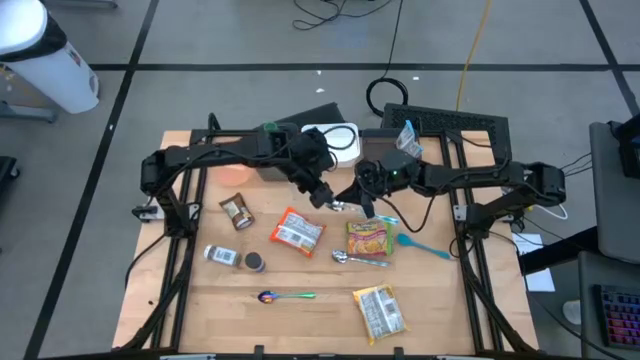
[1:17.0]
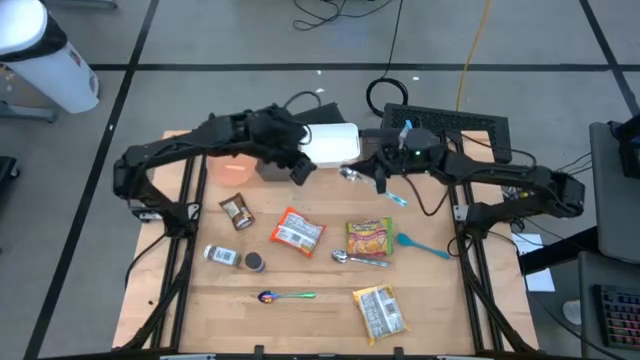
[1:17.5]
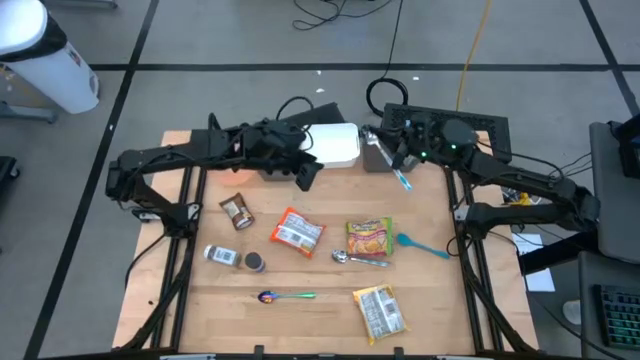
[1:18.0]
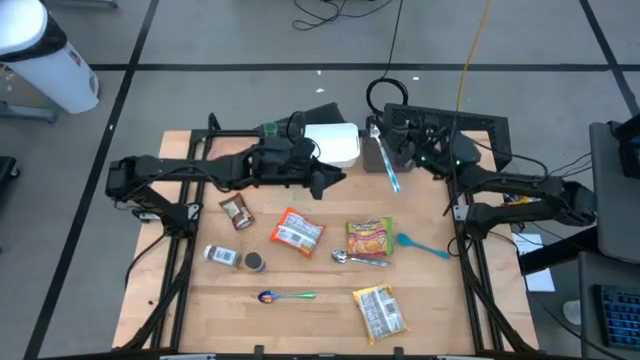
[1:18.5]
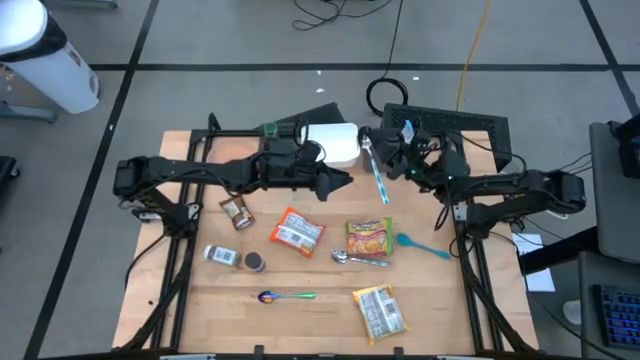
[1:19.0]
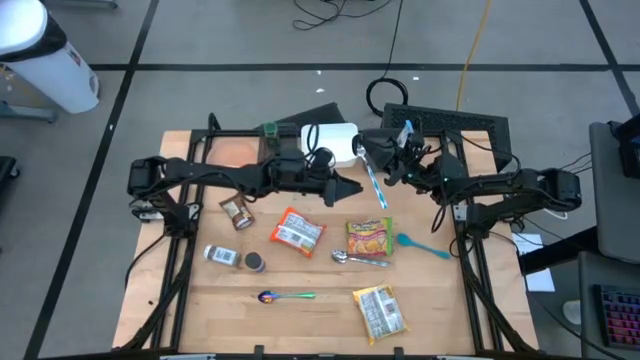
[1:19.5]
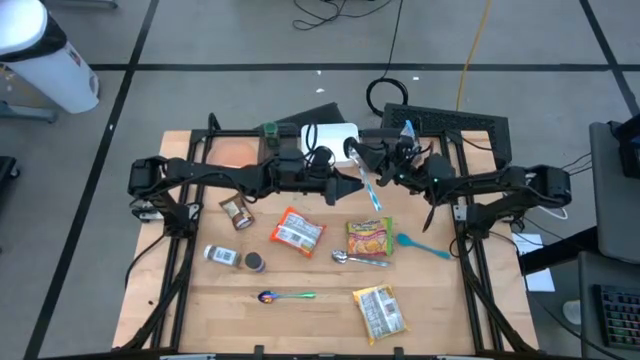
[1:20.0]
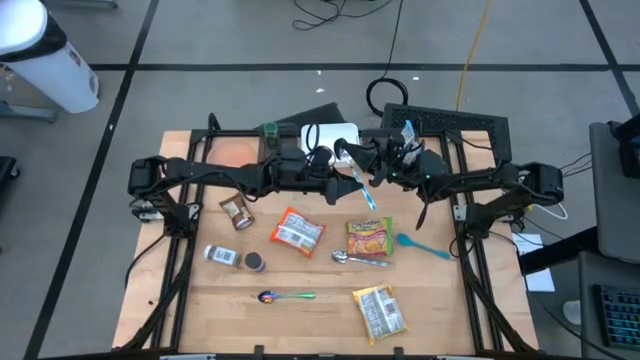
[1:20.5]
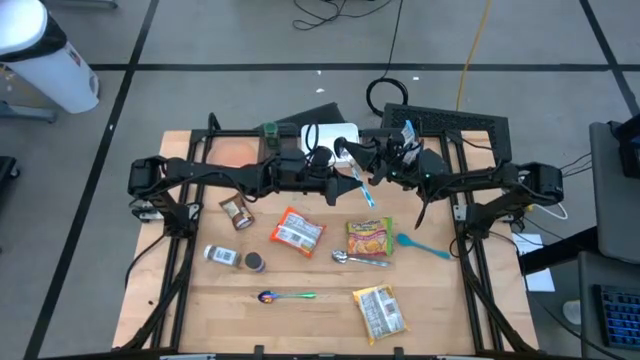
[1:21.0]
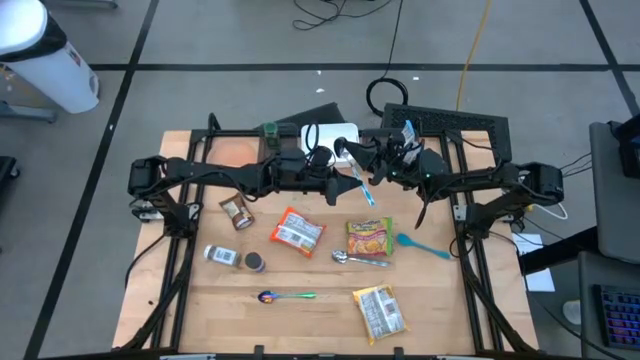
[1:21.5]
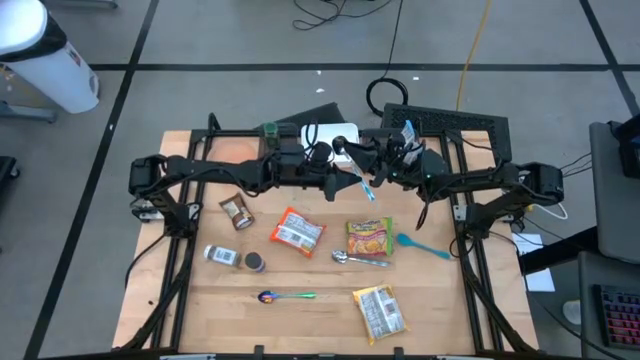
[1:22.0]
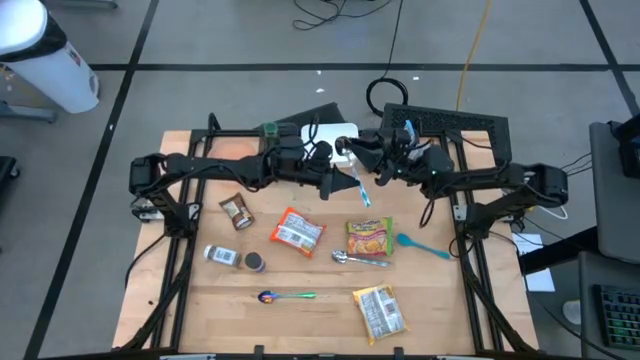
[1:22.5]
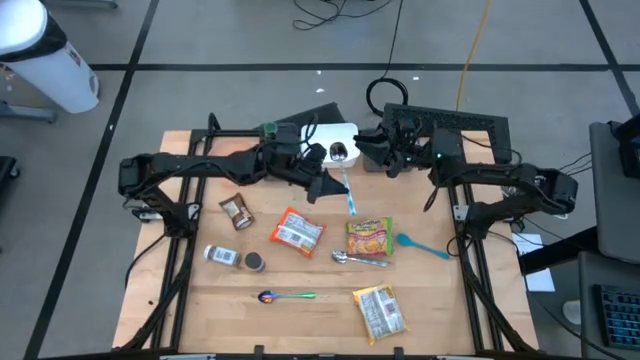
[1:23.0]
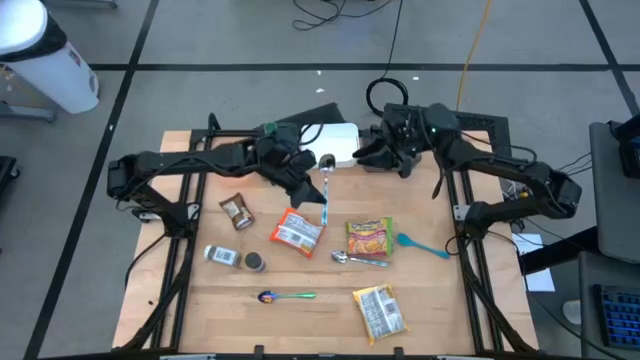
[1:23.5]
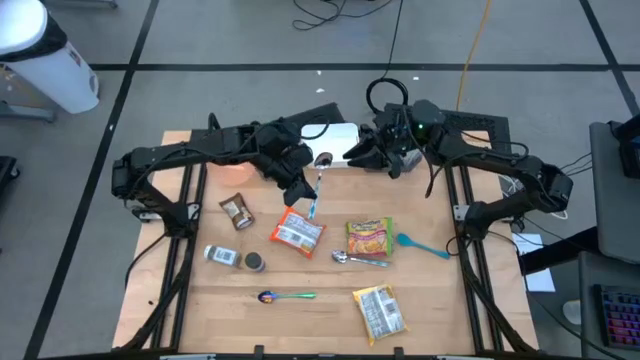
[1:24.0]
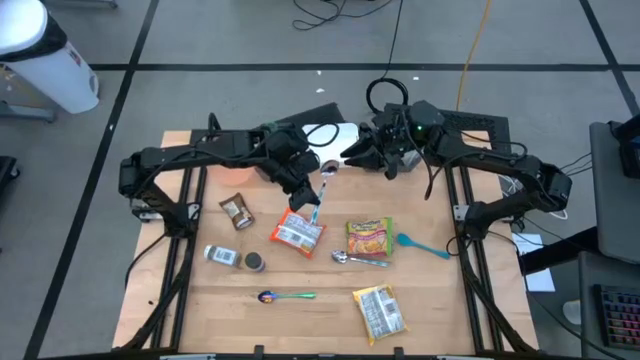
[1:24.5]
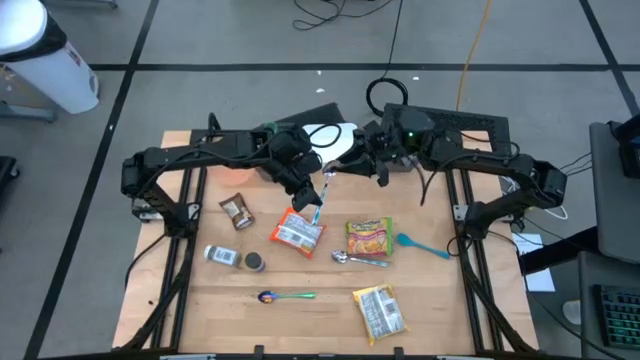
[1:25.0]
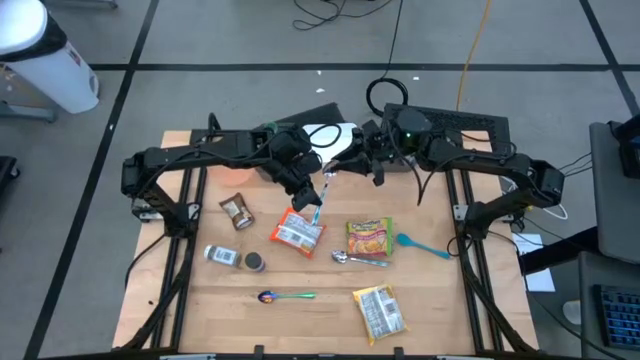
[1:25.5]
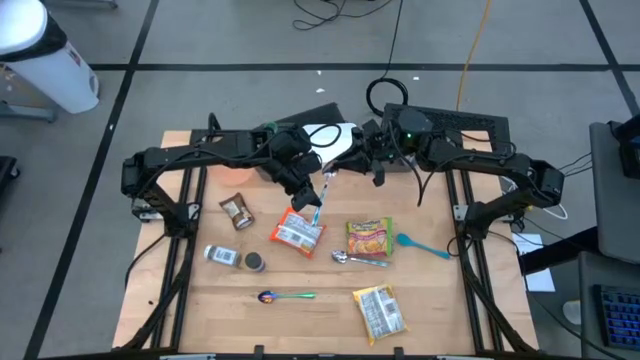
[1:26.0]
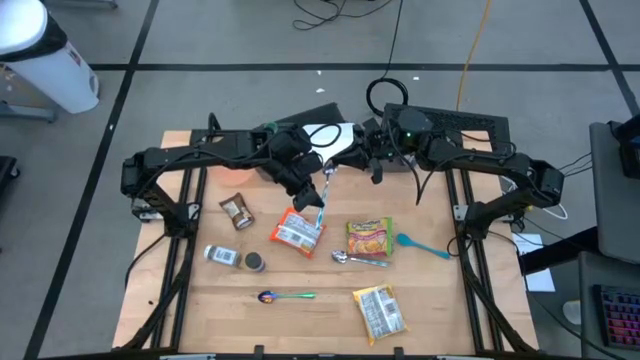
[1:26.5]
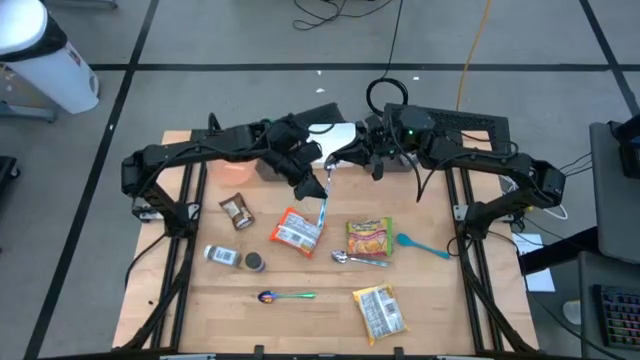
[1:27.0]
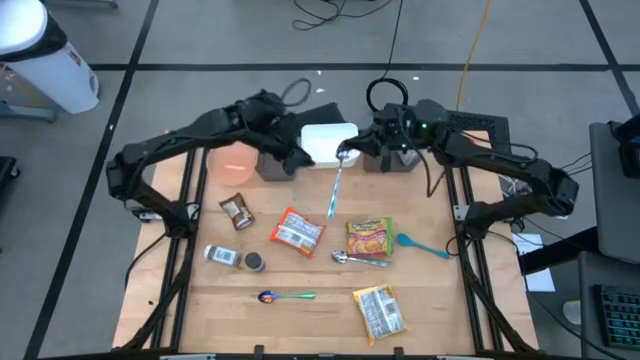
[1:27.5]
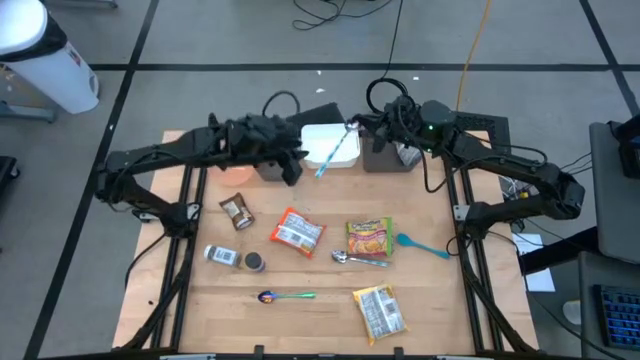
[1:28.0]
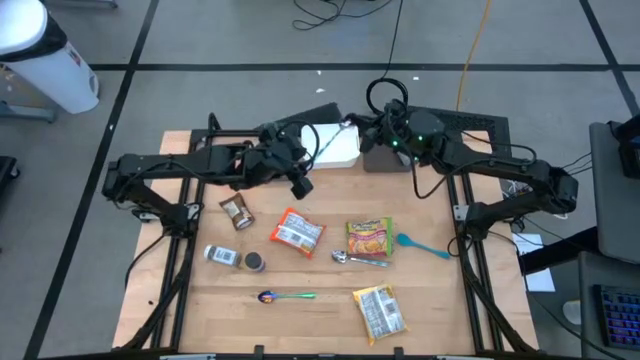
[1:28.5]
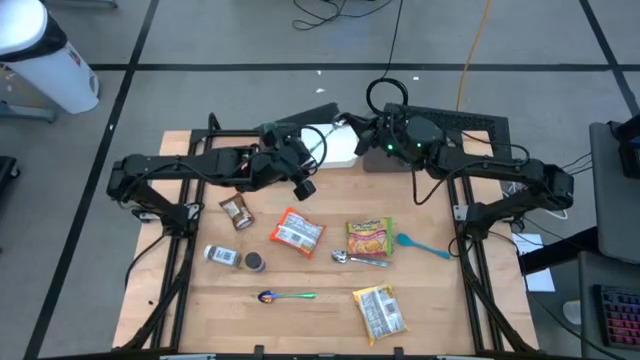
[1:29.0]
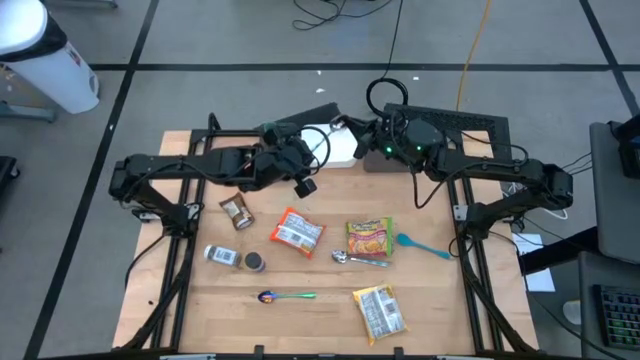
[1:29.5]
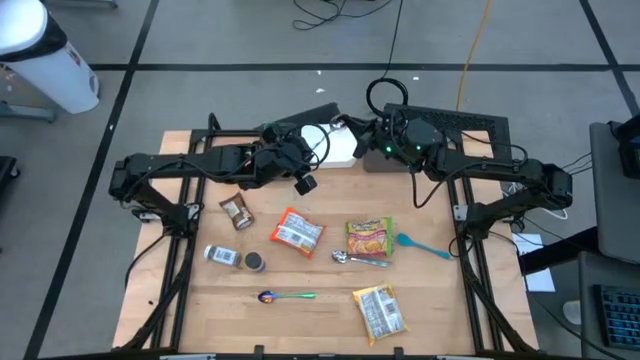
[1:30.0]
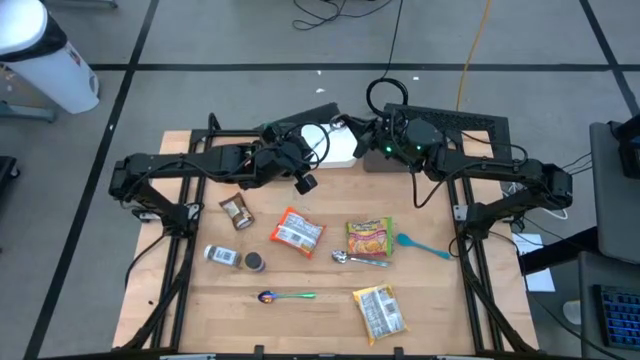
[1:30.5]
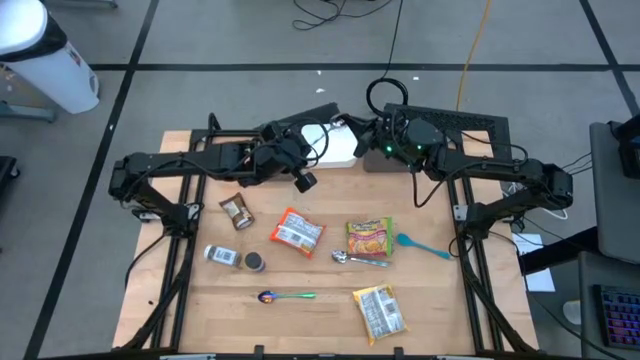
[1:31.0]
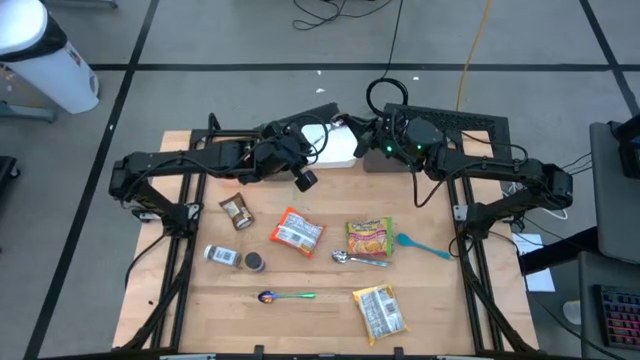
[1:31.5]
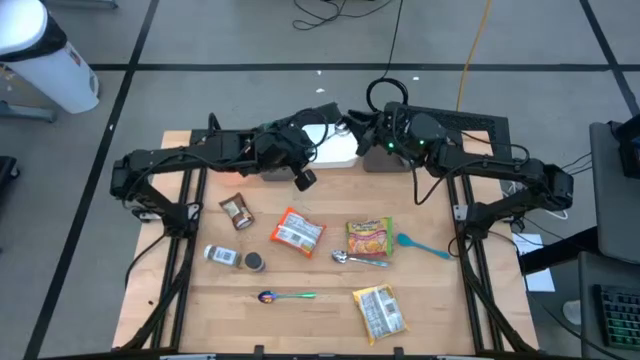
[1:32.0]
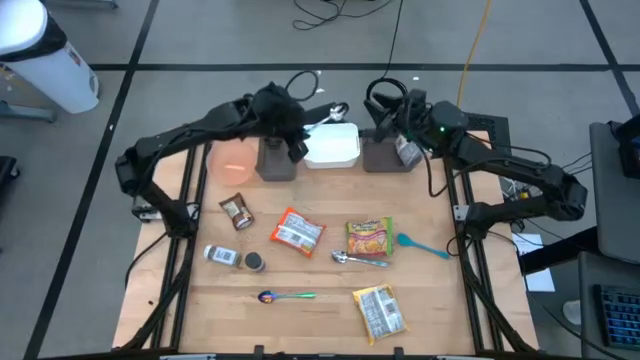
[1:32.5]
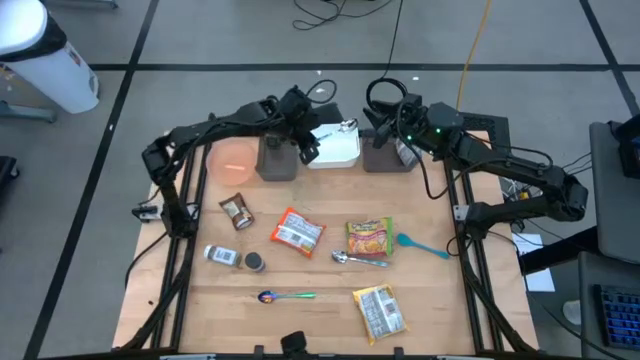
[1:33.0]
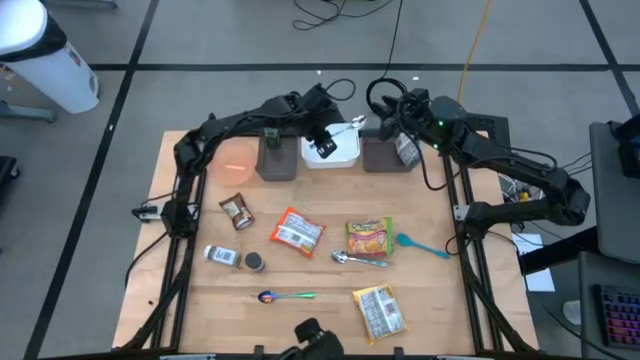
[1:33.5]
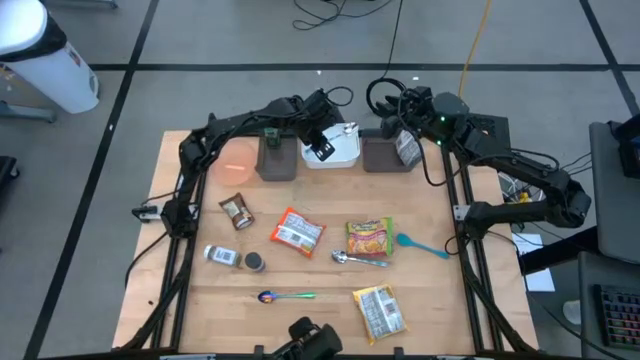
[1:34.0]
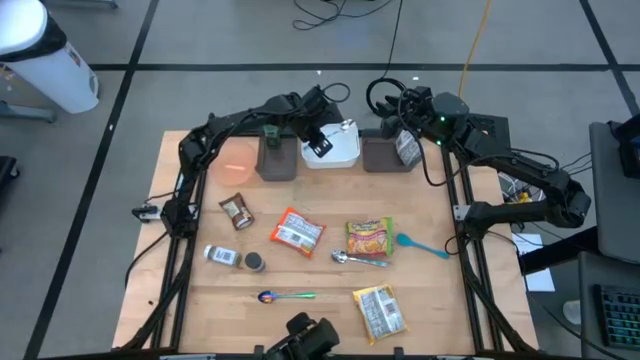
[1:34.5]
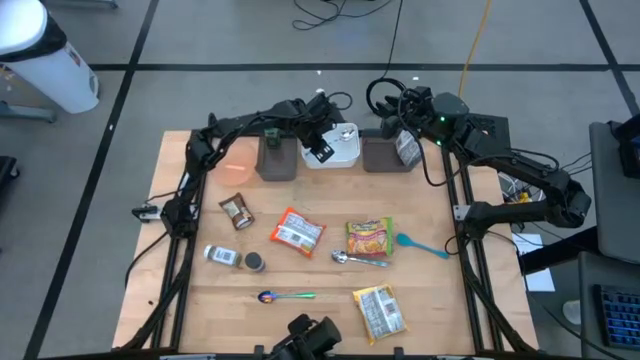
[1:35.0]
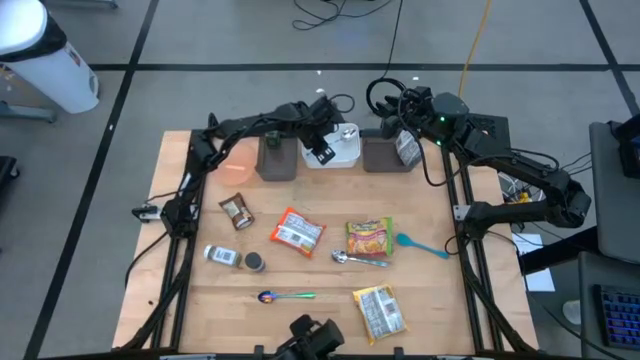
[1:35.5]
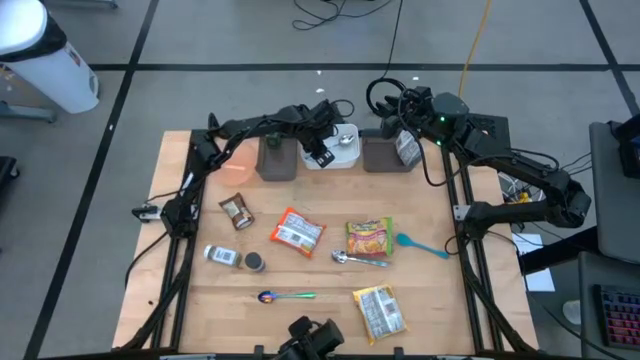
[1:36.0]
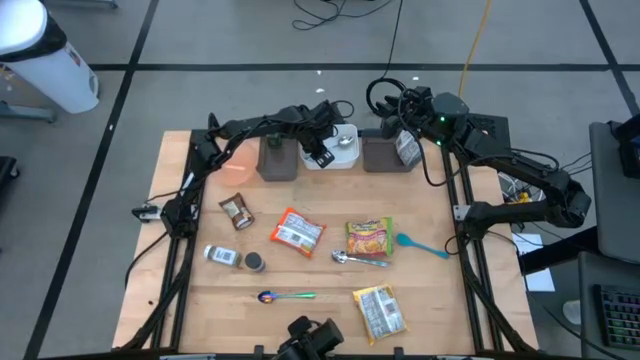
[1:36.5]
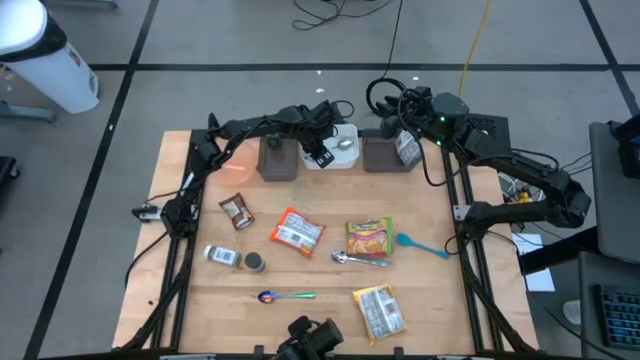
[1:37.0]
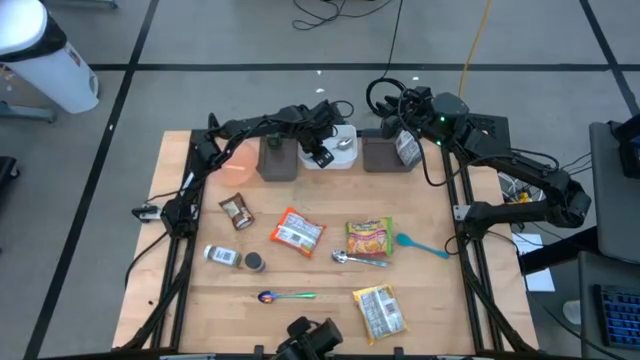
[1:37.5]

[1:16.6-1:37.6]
Task: Pick & Place Food Item
Put the bottom blue spoon into the white bin
